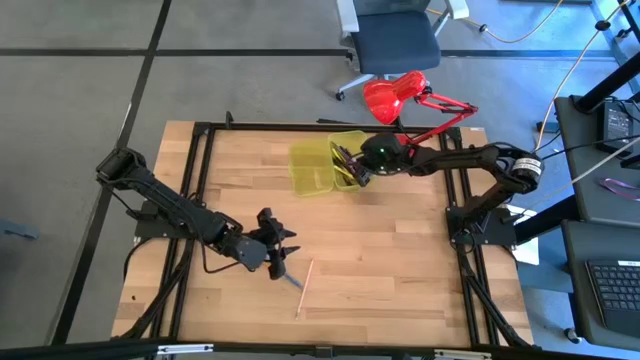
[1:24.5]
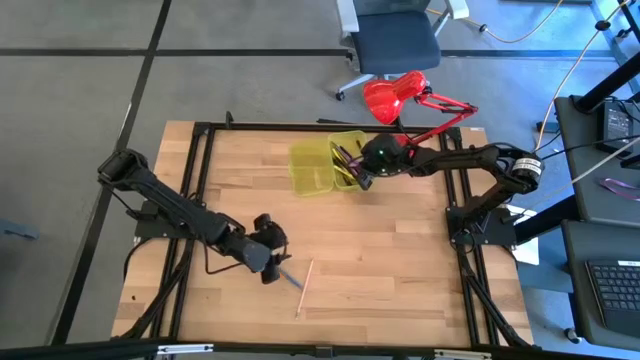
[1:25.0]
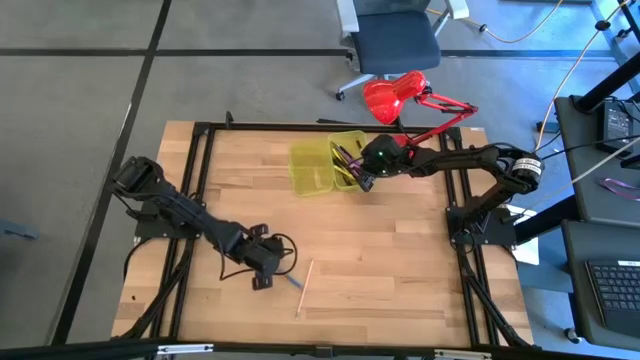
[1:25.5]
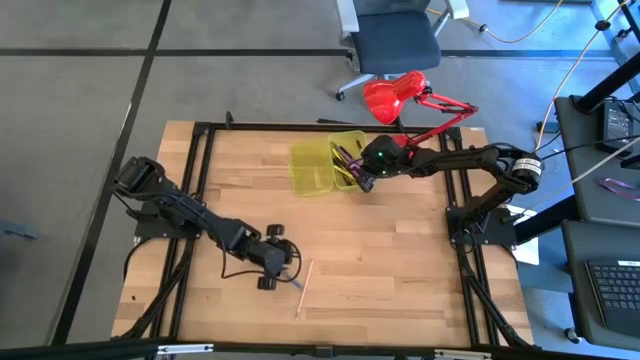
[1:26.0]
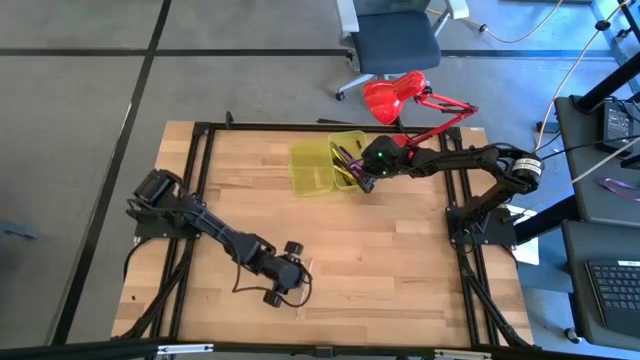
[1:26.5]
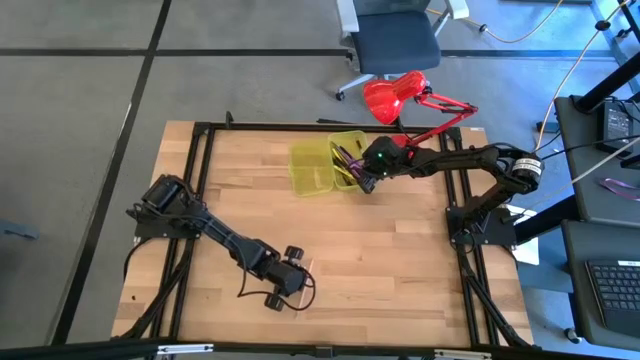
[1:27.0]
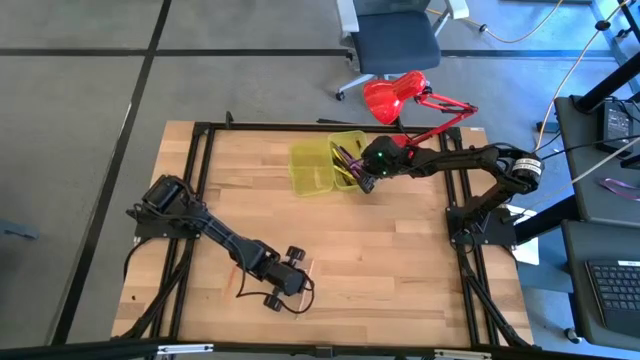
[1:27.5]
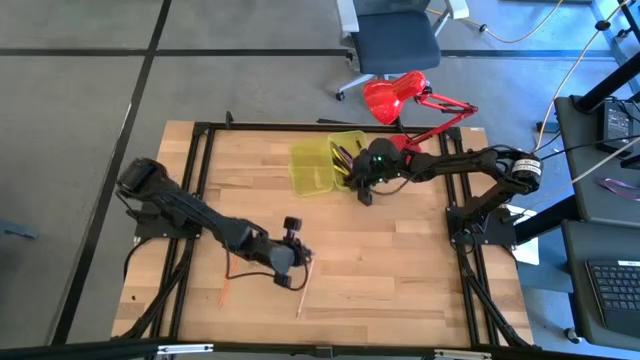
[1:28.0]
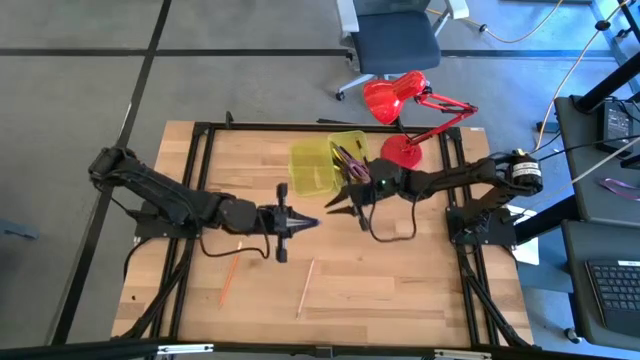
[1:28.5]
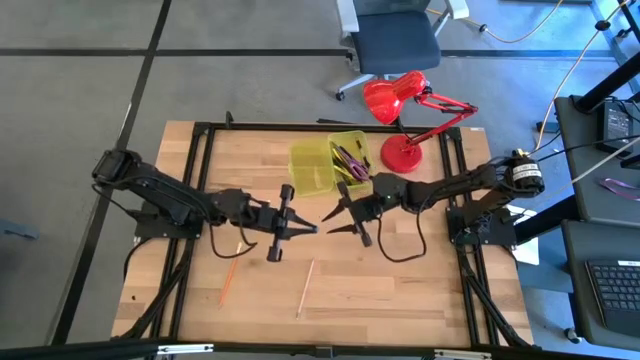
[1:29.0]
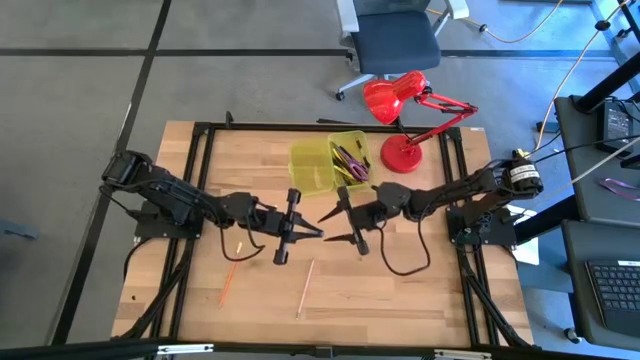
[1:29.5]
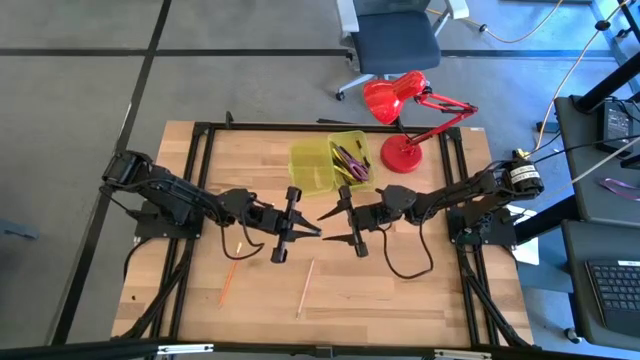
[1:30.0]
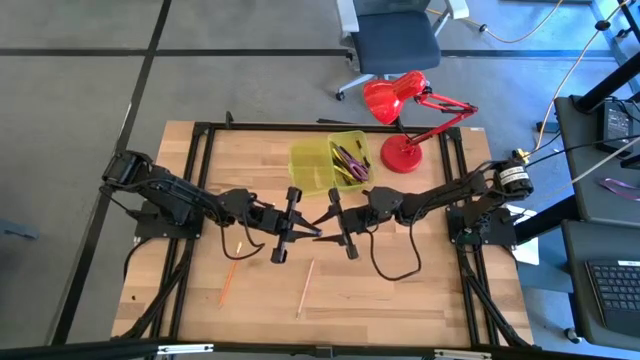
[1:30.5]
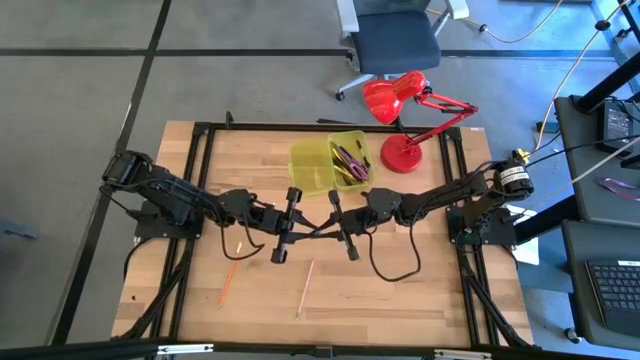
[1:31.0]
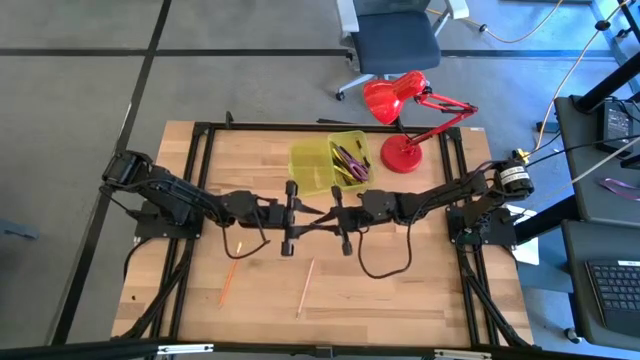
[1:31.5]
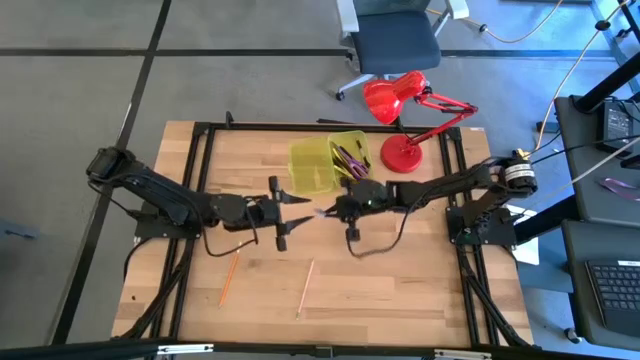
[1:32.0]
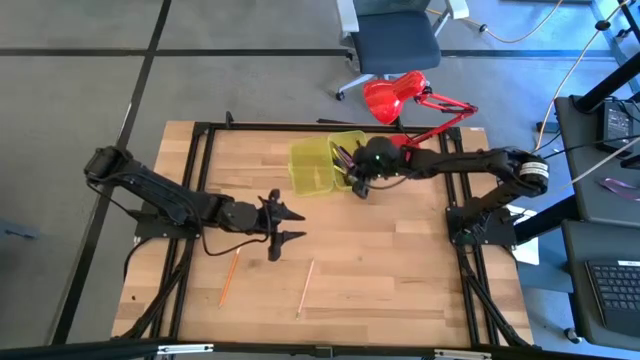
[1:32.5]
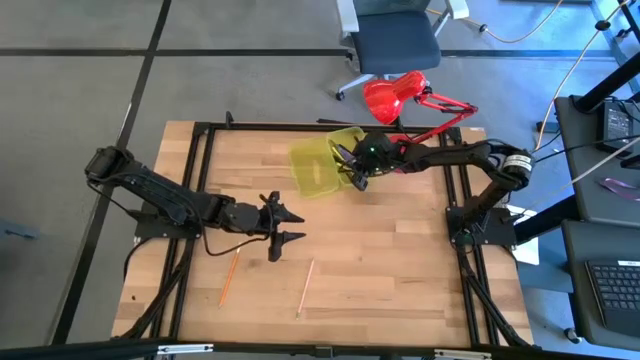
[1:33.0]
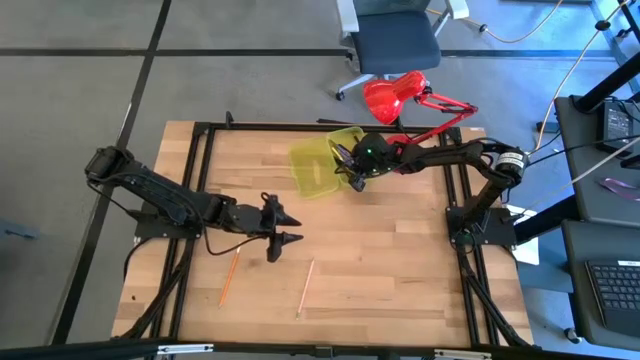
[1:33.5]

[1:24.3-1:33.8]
Task: Pick & place school supplies into a supply box
Put the blue pen into the yellow supply box

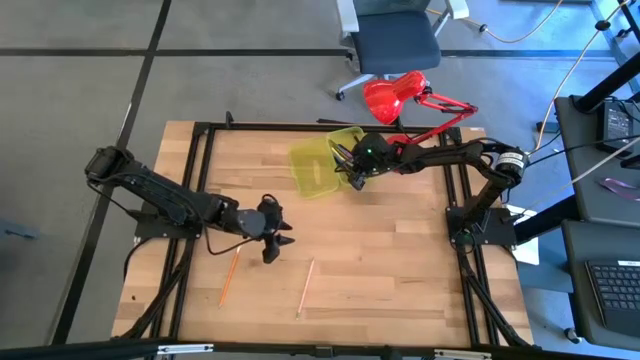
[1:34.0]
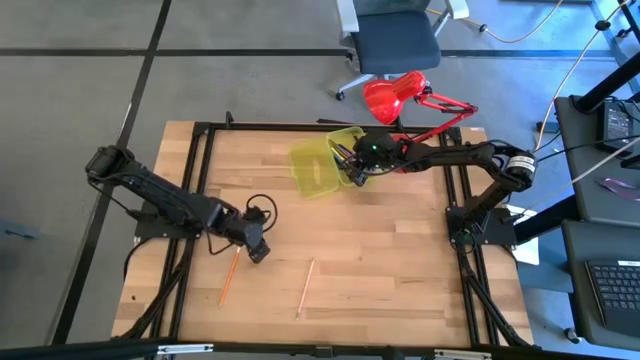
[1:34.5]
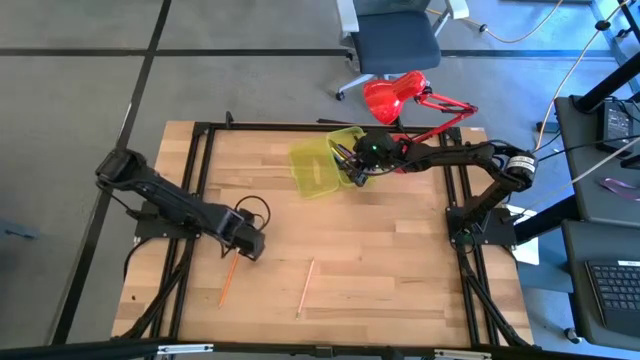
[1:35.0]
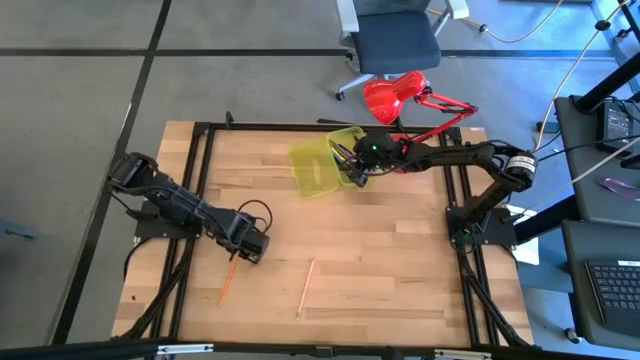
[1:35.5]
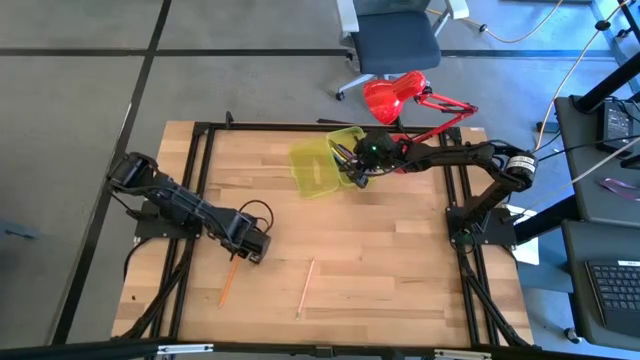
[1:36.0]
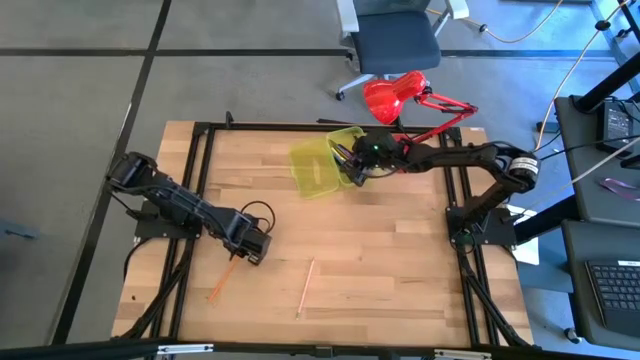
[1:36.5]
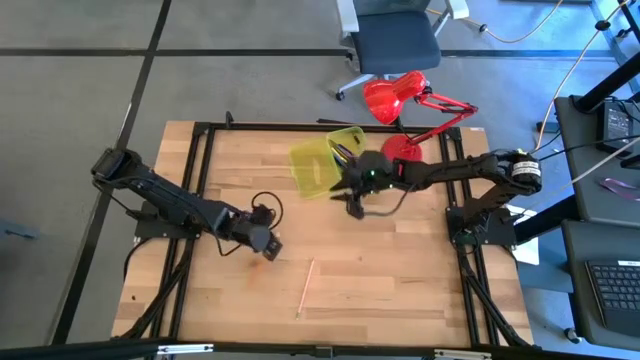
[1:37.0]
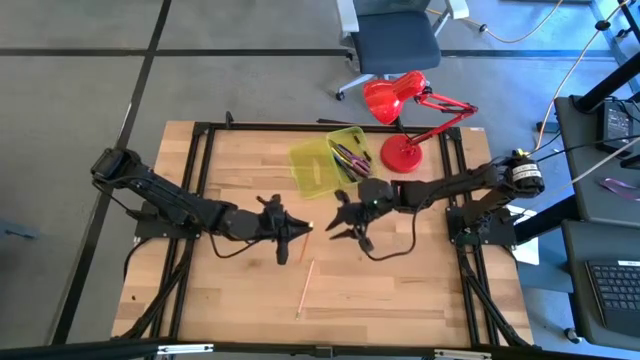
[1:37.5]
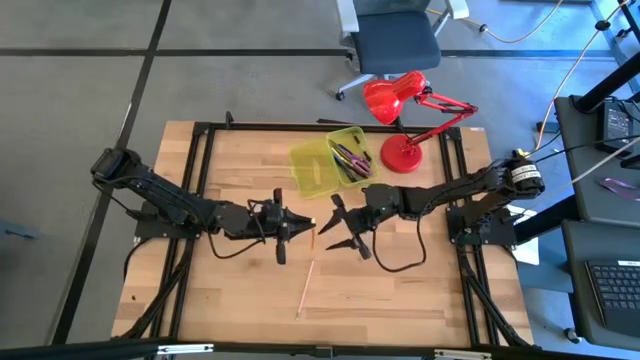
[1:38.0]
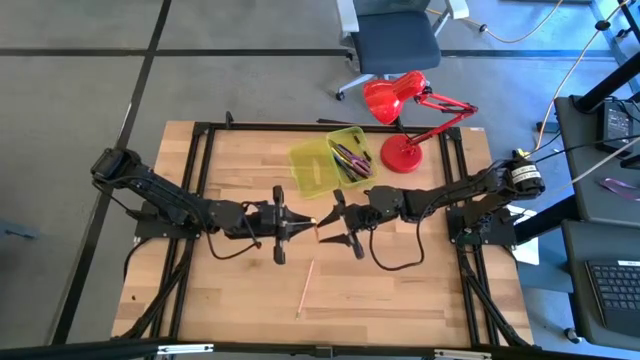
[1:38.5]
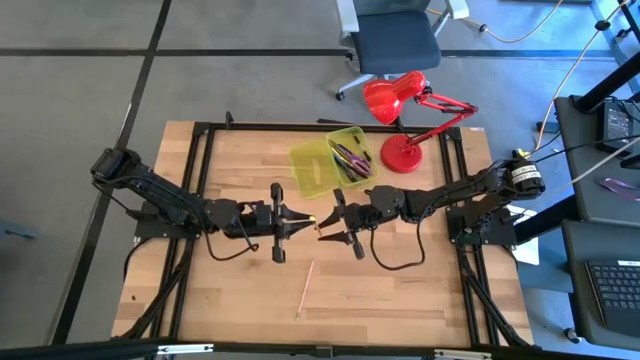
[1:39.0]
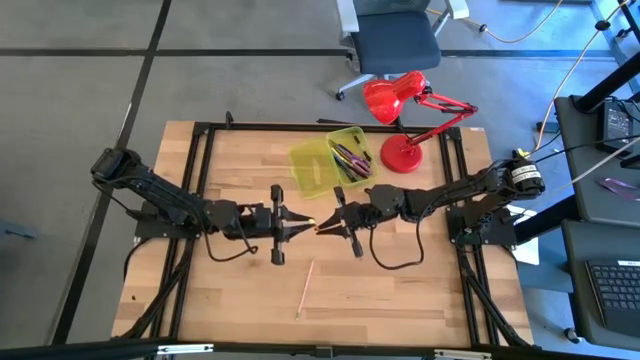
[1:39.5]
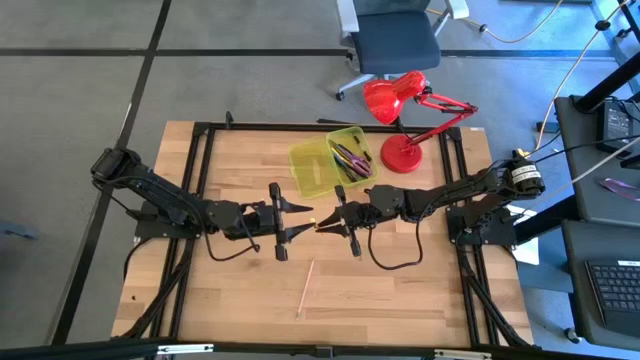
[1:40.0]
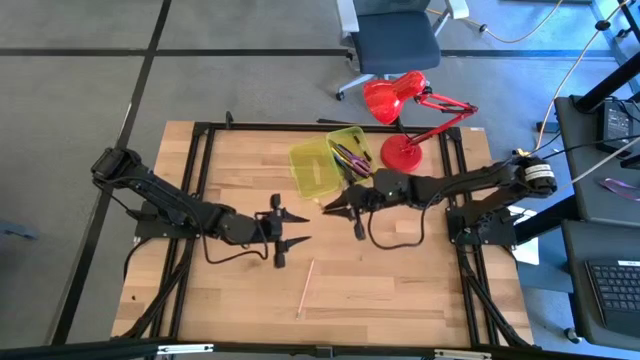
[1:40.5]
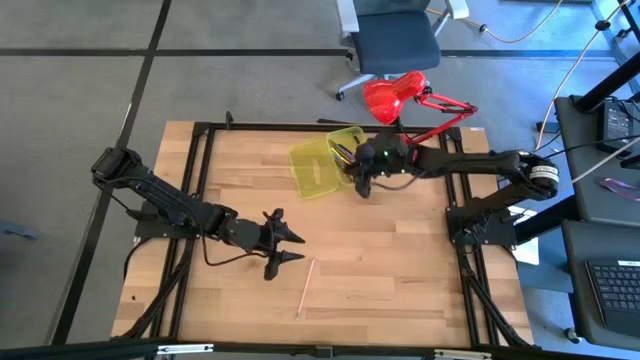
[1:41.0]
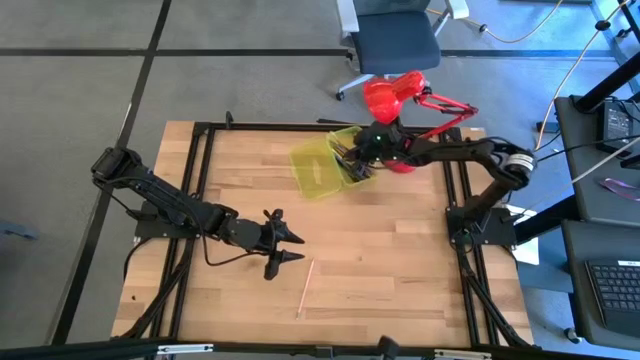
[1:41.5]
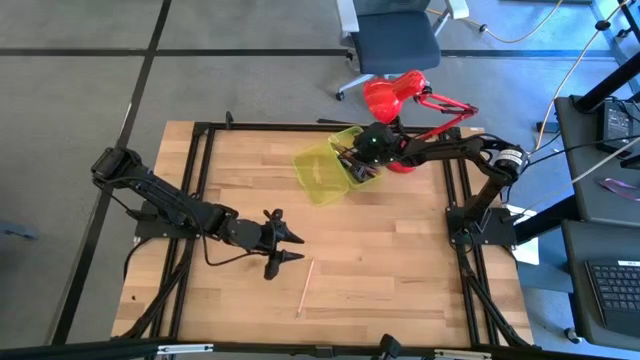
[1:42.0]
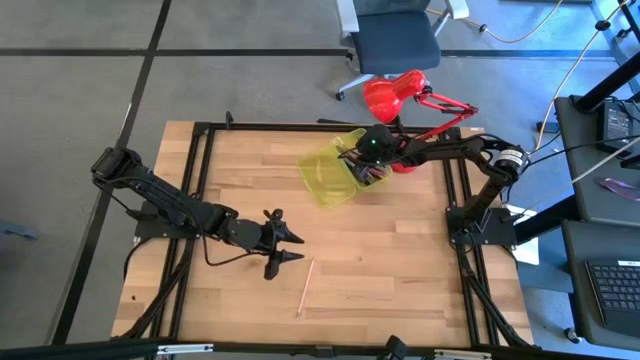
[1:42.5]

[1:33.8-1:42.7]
Put the orange pencil into the yellow box

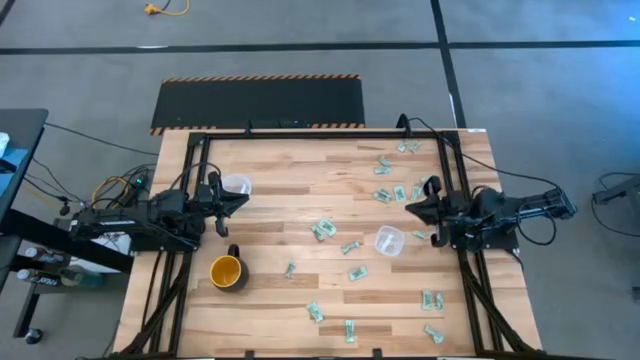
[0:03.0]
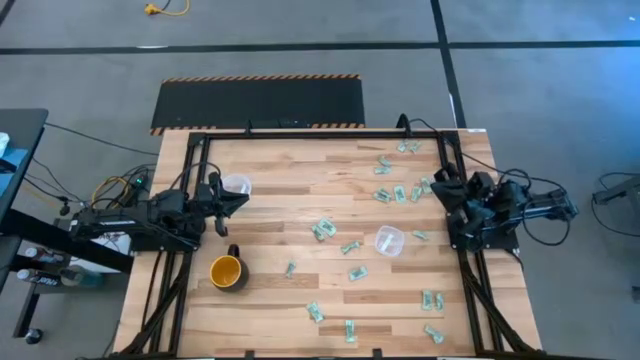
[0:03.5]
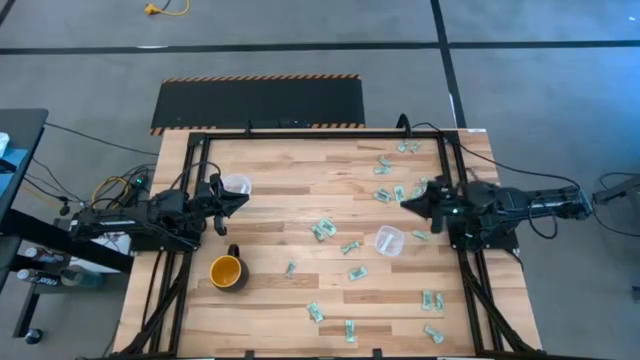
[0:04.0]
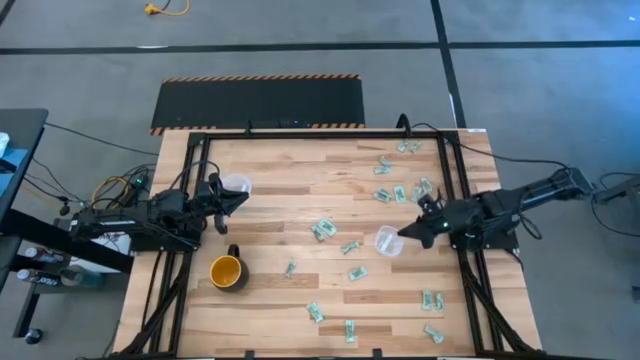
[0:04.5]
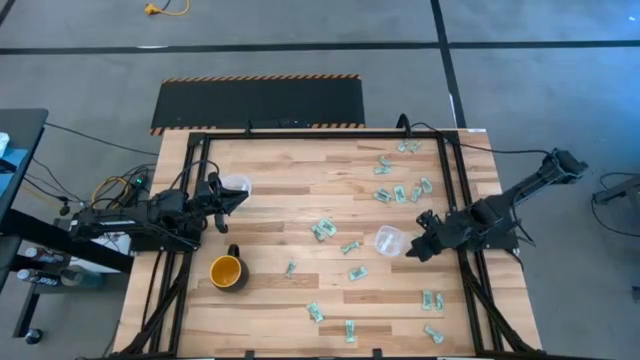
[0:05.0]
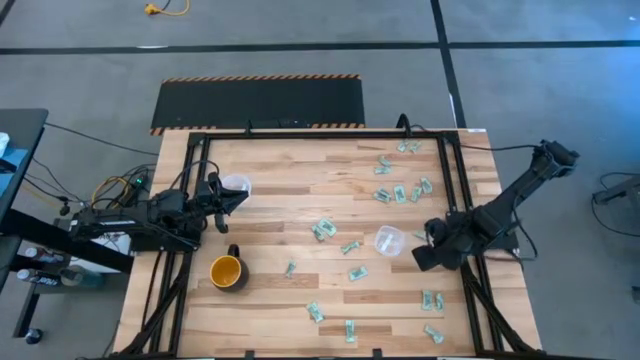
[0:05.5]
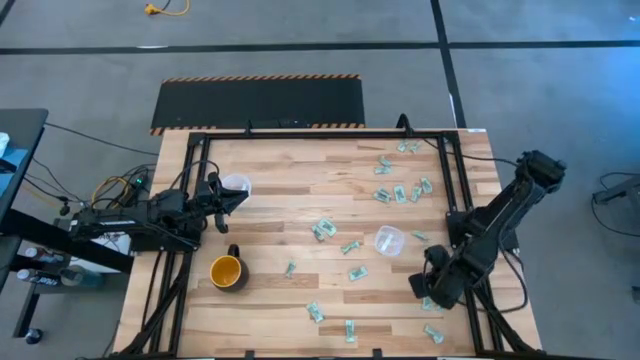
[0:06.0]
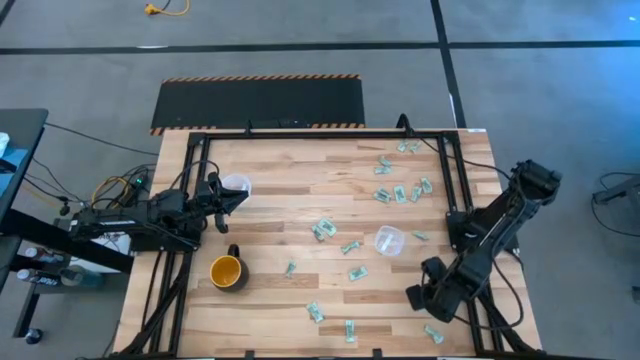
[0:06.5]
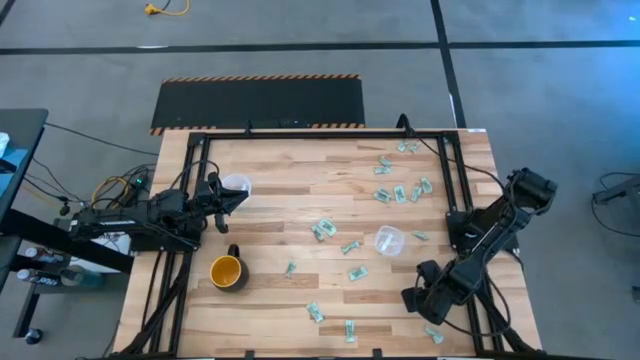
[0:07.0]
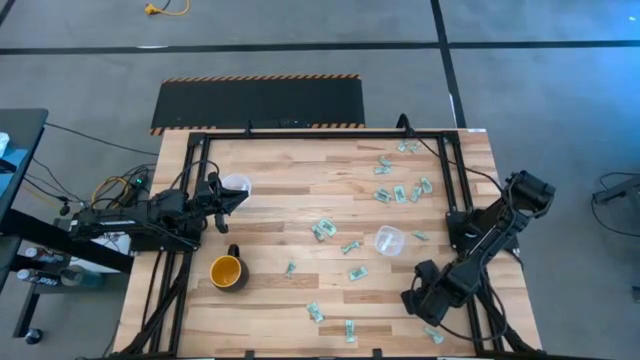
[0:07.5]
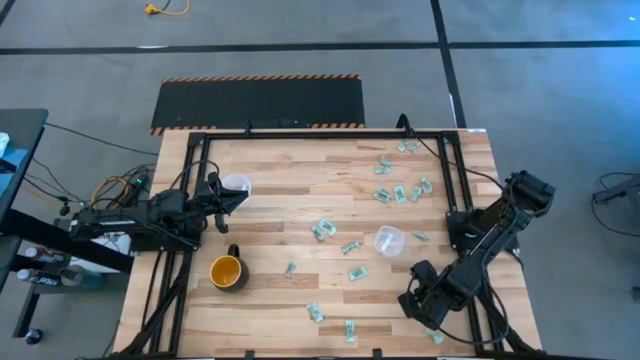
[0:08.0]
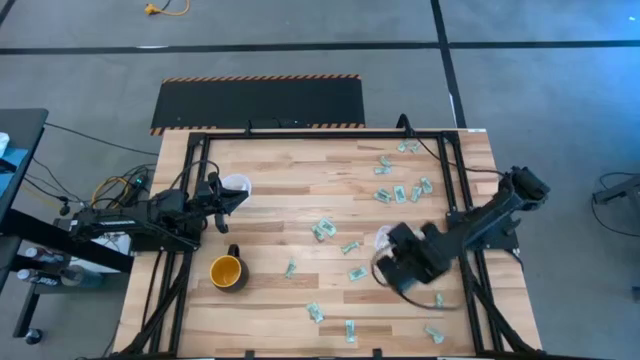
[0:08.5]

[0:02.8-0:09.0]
Task: Pick and place Stevia / Truvia into bins
Put the white stevia packet into the square transparent container
